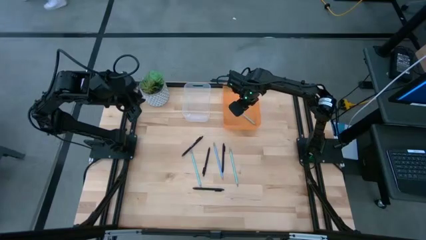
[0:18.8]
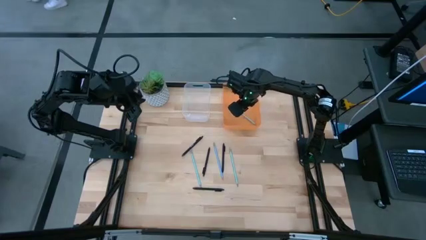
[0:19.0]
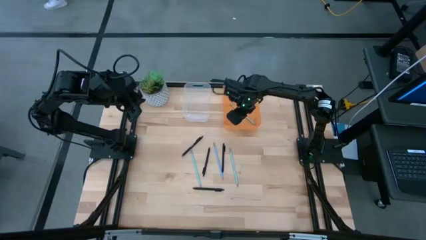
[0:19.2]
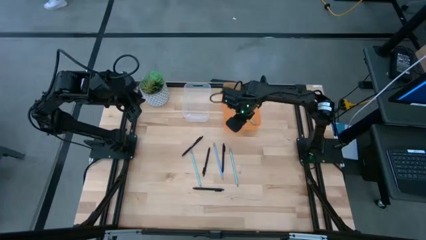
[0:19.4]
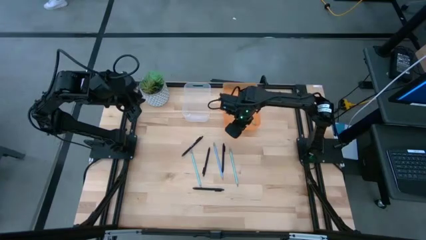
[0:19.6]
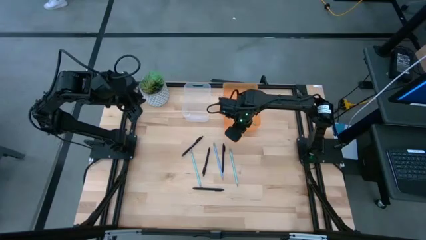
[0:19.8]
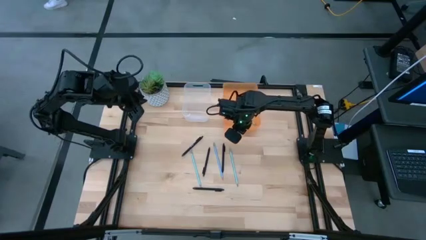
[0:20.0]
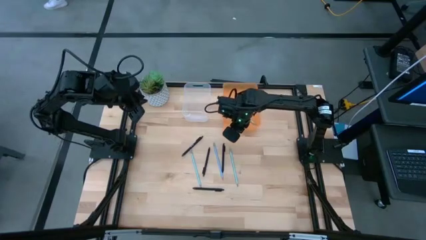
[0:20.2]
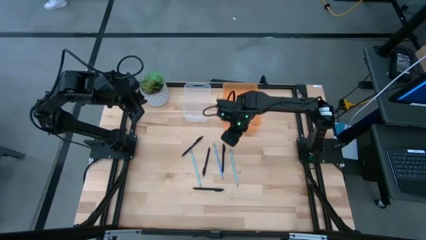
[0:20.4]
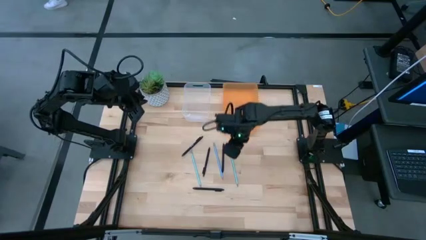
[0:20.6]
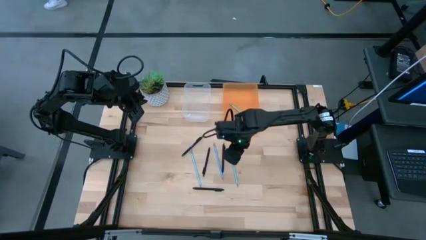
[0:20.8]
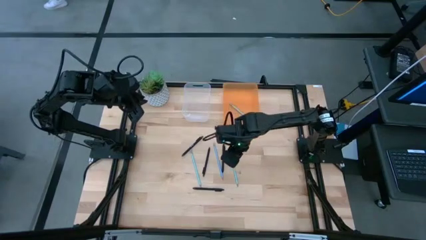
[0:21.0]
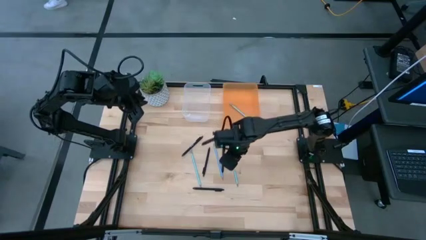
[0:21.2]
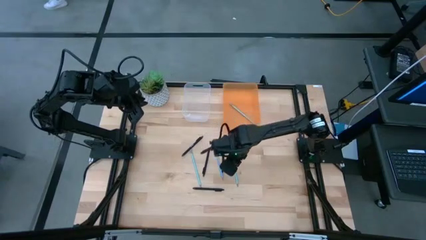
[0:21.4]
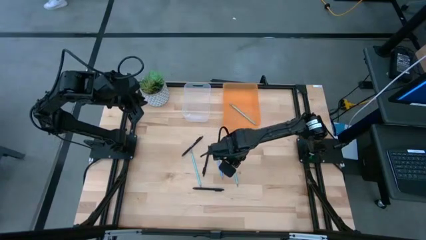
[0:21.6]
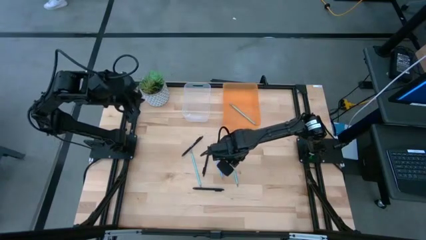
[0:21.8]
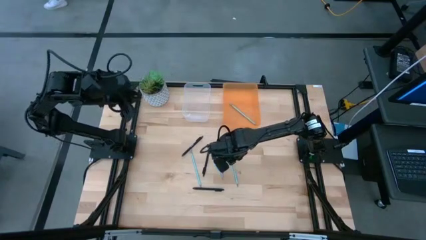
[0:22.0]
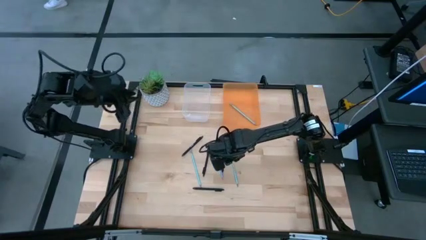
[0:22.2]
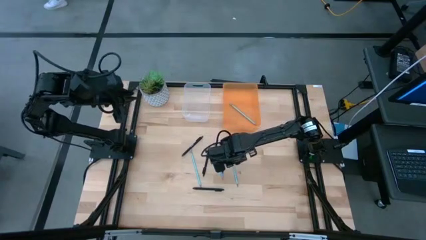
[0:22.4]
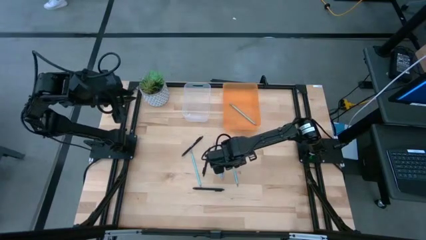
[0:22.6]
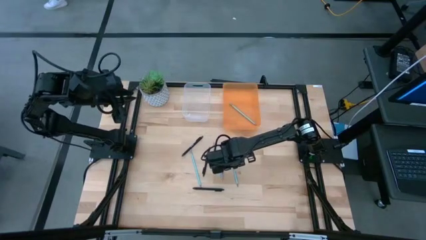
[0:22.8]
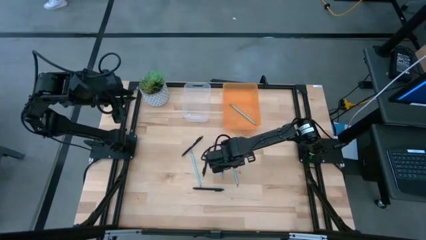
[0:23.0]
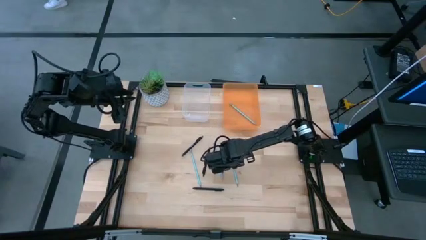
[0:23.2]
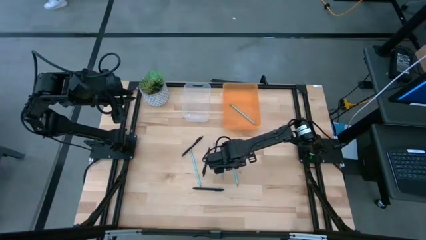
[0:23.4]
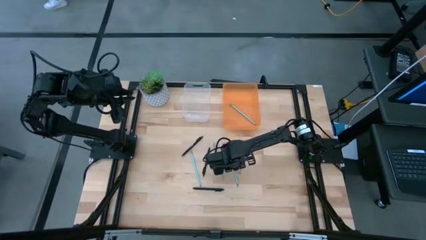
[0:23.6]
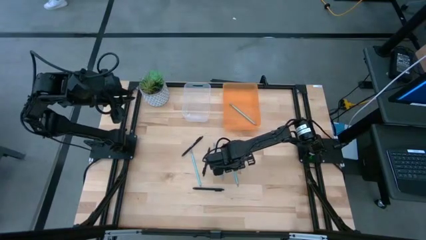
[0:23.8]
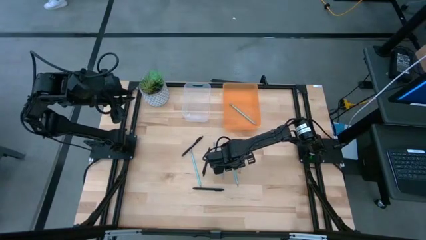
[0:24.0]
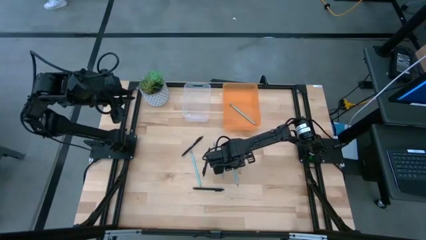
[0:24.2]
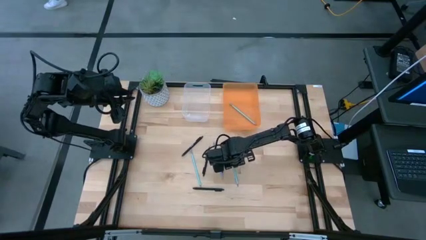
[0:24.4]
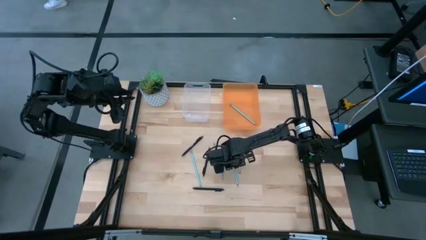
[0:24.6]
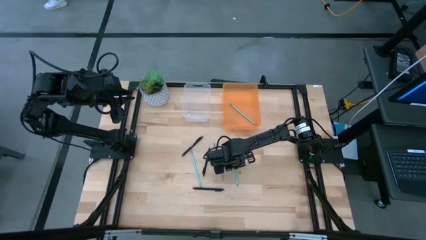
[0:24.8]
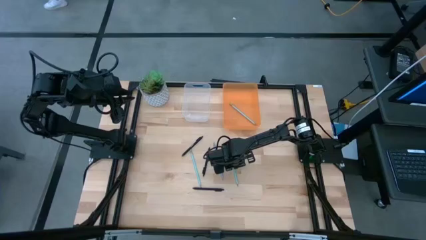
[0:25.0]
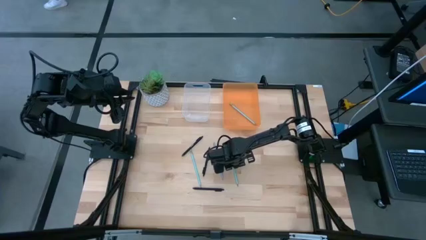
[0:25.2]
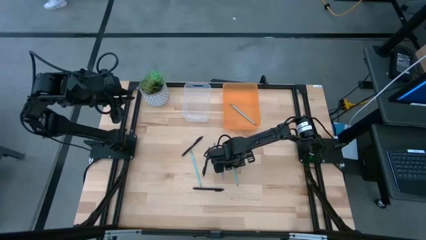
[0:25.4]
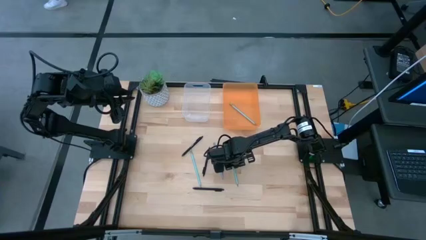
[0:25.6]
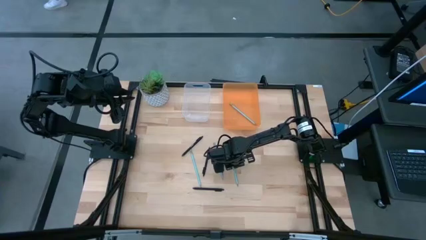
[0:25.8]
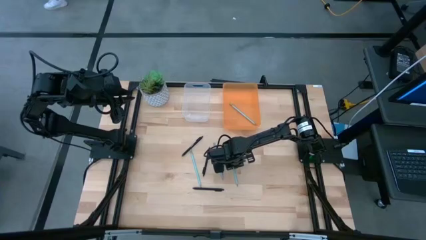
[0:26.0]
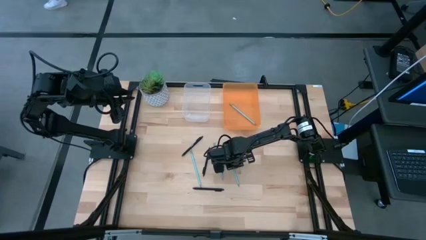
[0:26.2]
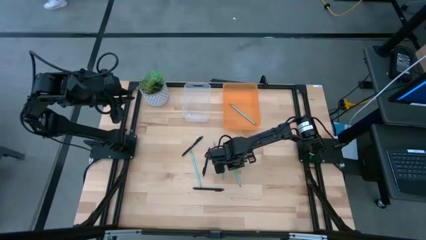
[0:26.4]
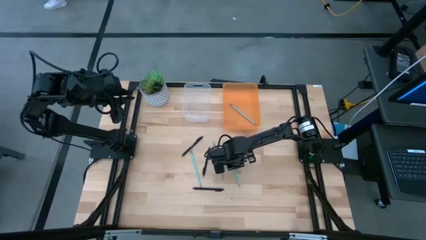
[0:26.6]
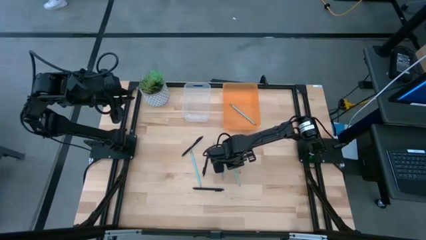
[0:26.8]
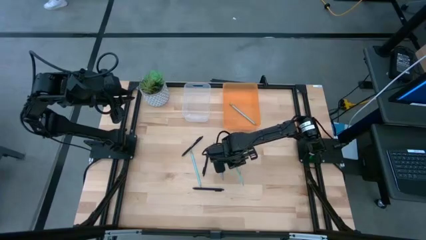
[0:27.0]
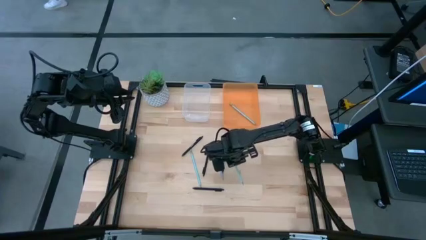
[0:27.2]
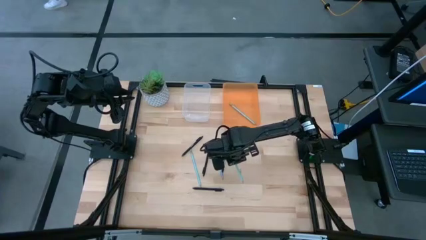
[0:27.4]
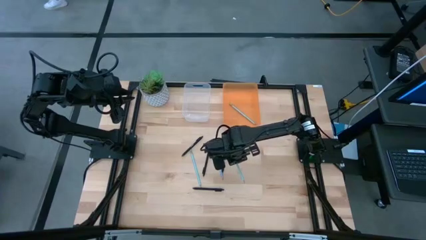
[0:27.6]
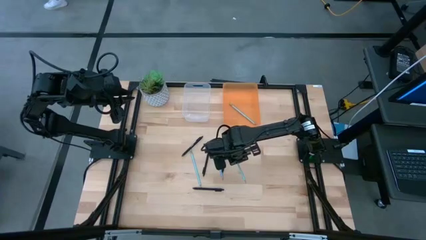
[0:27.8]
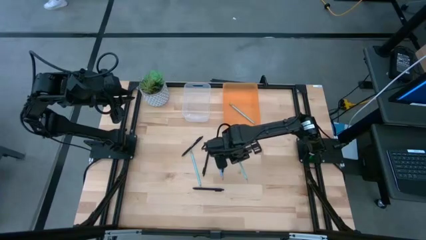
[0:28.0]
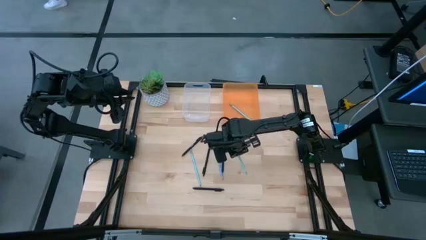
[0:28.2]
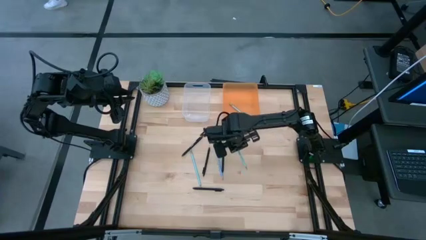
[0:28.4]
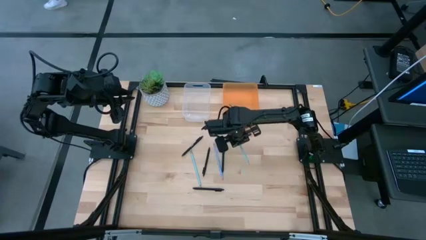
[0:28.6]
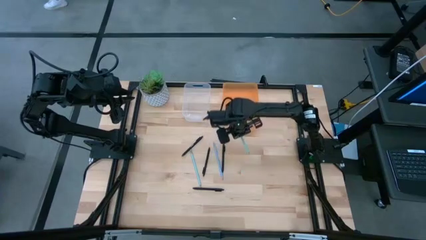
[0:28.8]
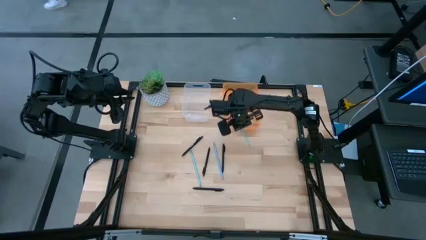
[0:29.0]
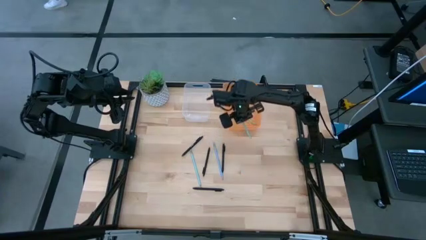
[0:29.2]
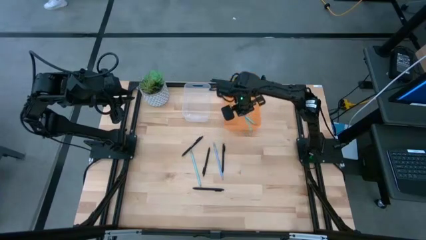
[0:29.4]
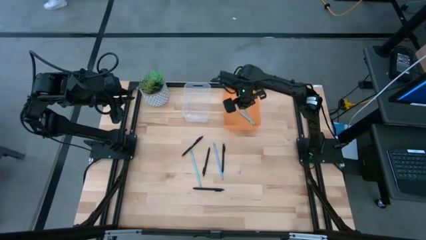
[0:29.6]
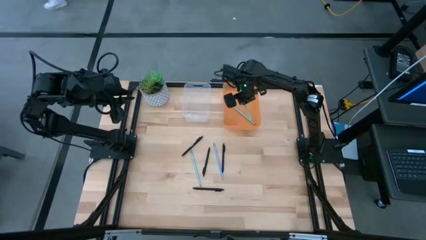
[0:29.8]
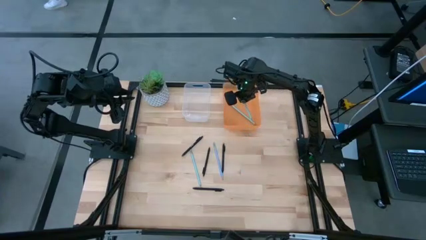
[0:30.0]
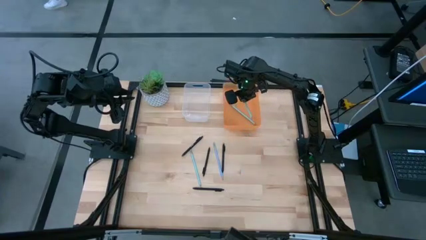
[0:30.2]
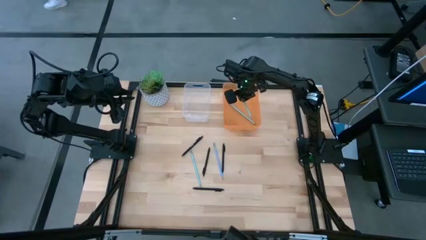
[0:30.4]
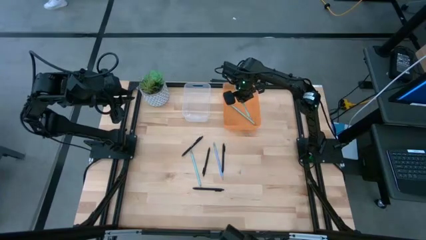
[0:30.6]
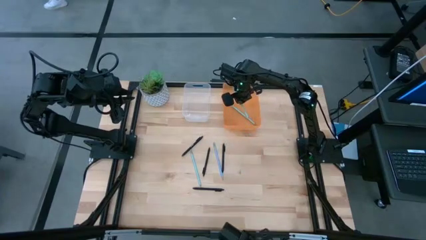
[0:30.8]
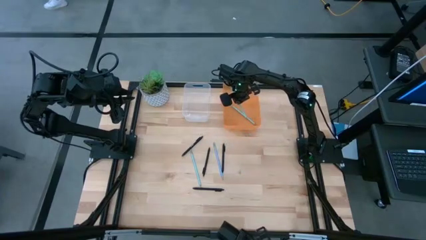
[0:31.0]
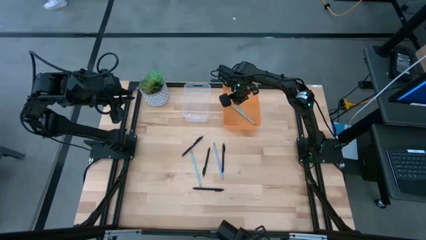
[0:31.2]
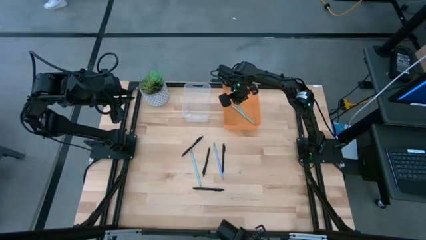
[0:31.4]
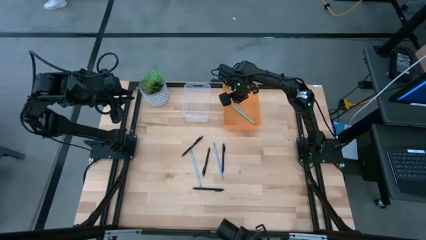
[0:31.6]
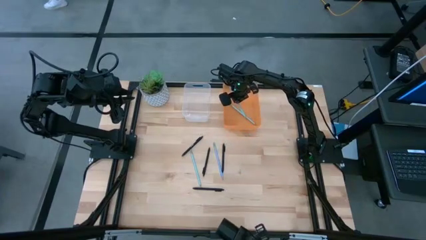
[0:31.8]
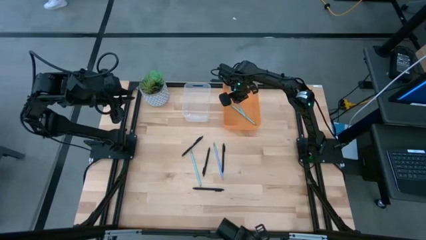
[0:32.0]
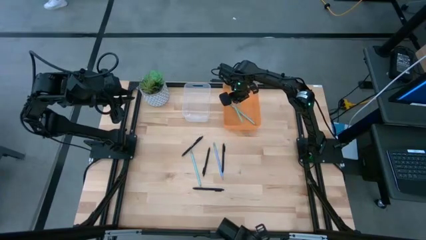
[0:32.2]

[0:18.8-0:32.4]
Task: Sort pens & pencils
Put the light green pencil into the orange bin
